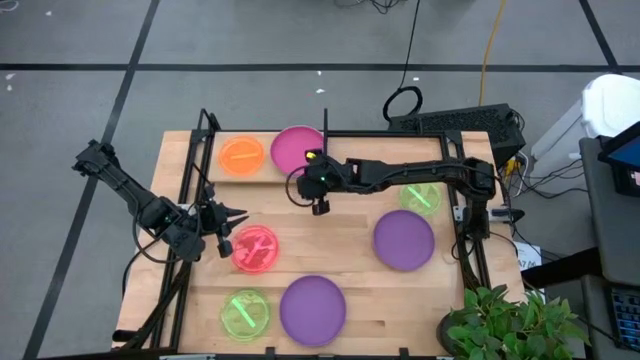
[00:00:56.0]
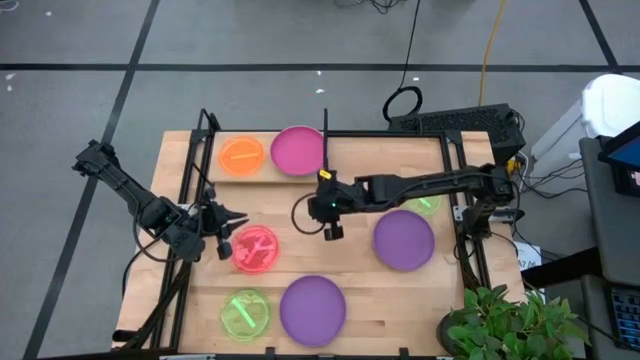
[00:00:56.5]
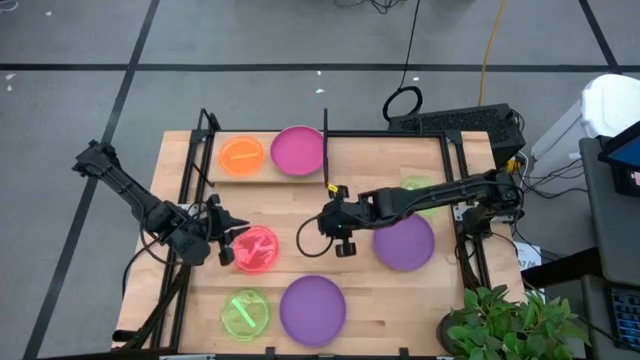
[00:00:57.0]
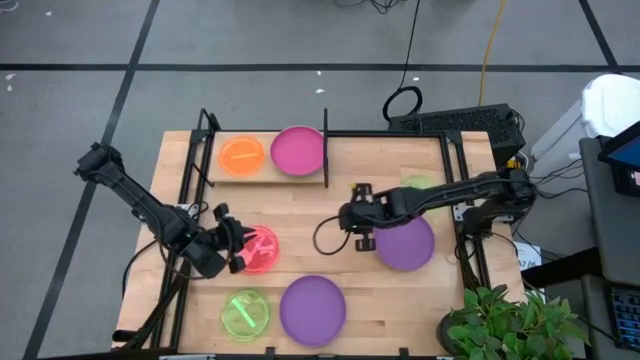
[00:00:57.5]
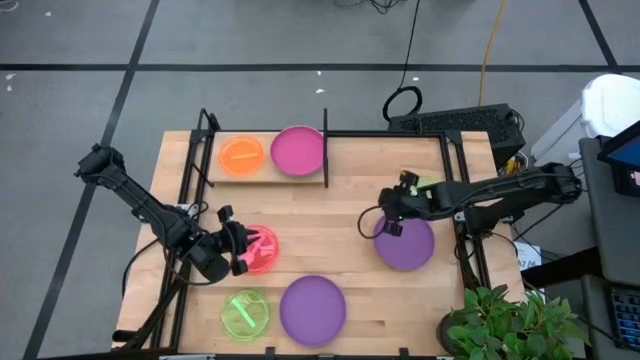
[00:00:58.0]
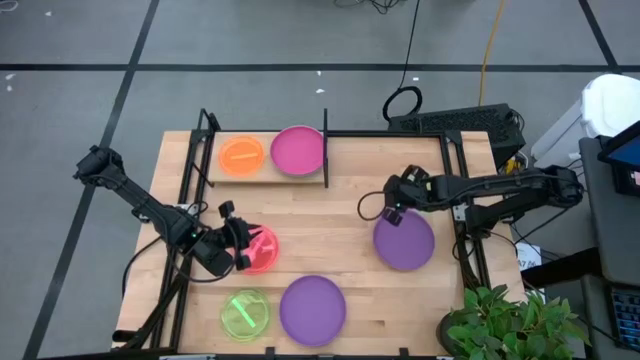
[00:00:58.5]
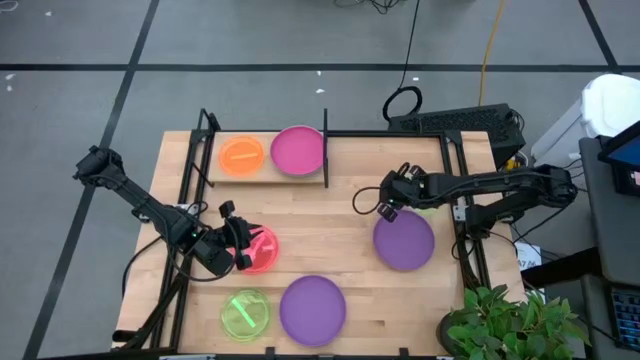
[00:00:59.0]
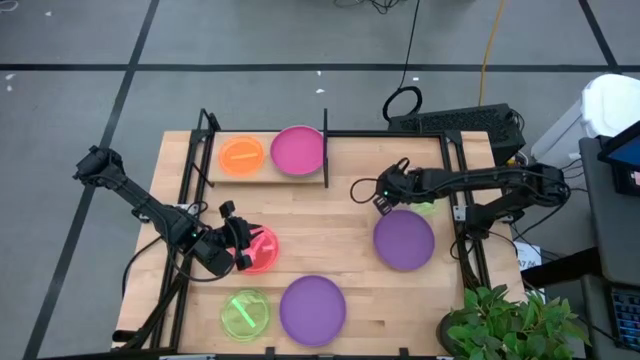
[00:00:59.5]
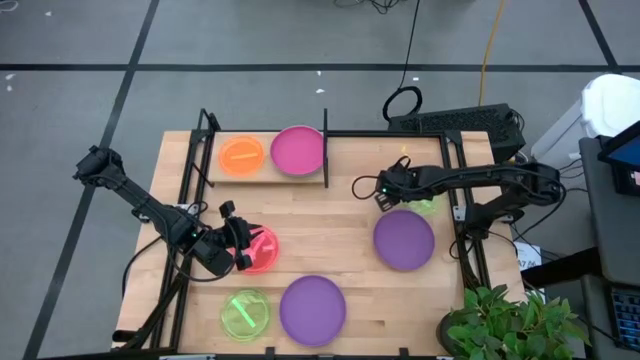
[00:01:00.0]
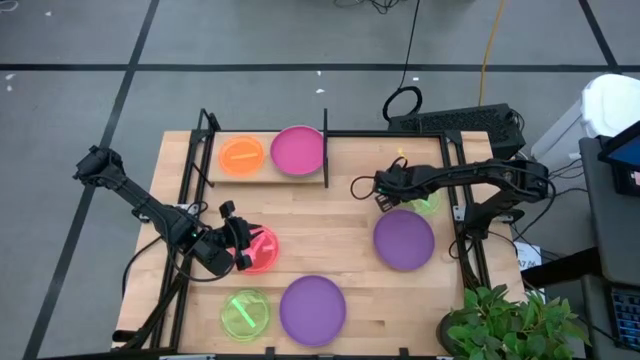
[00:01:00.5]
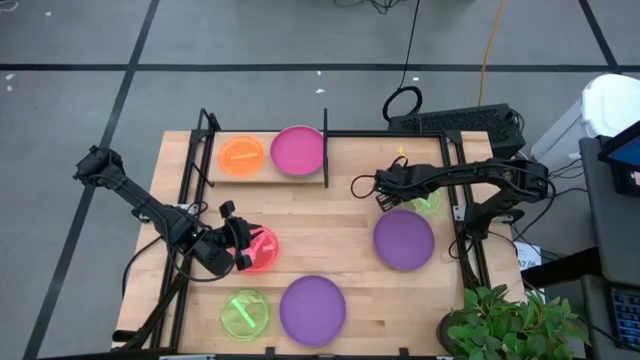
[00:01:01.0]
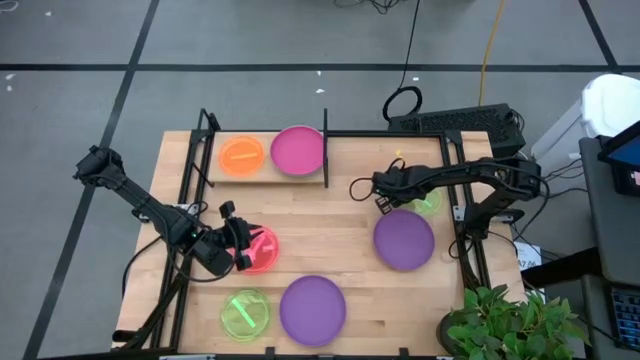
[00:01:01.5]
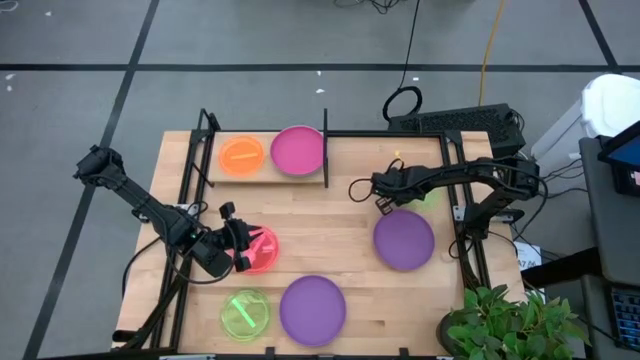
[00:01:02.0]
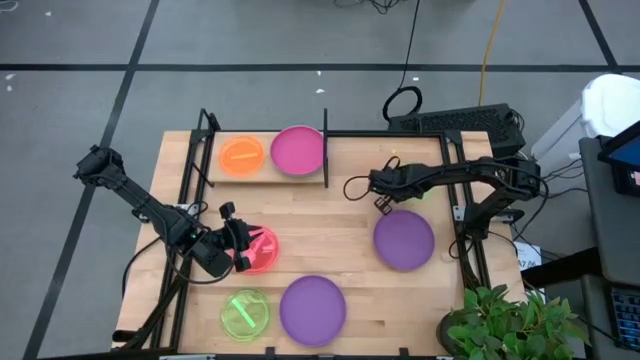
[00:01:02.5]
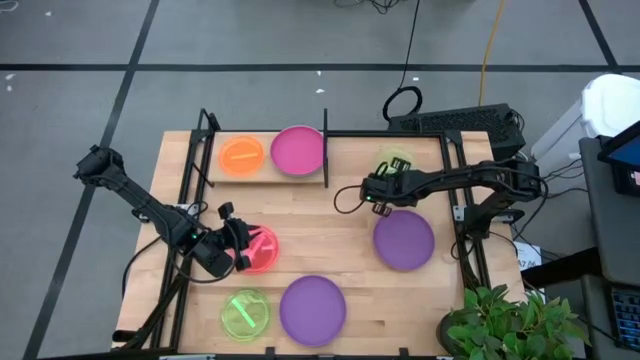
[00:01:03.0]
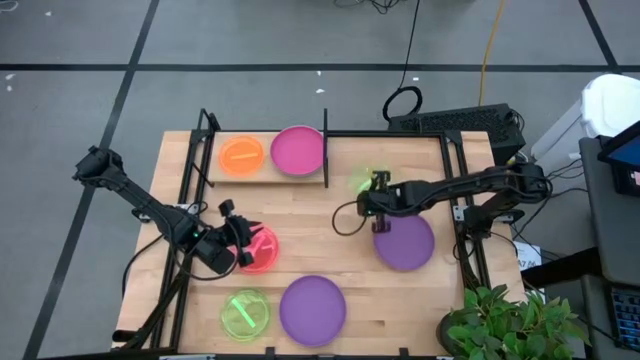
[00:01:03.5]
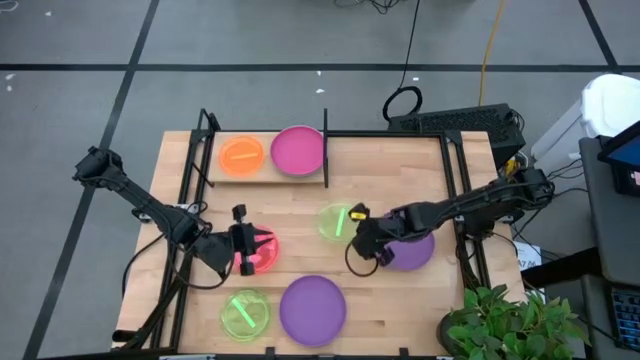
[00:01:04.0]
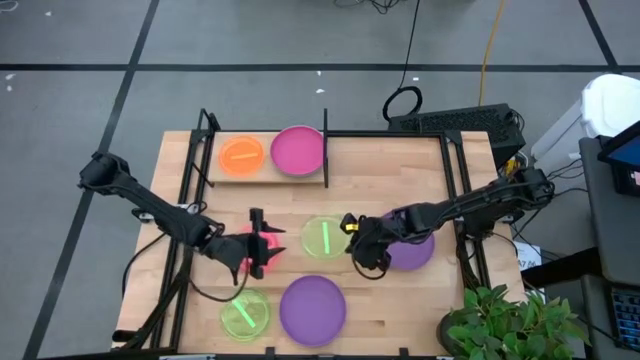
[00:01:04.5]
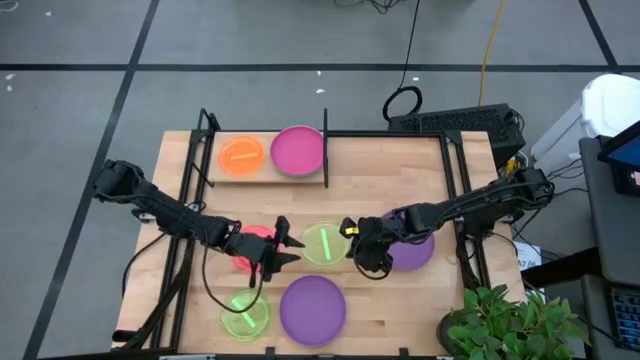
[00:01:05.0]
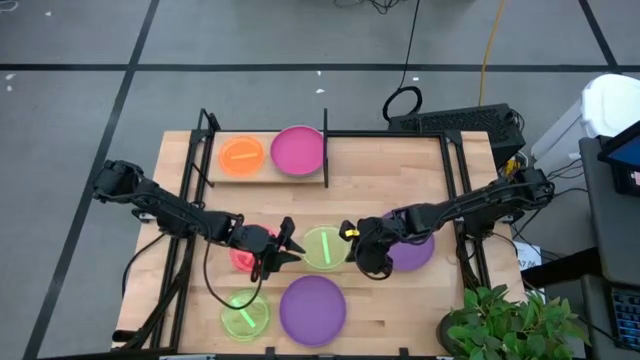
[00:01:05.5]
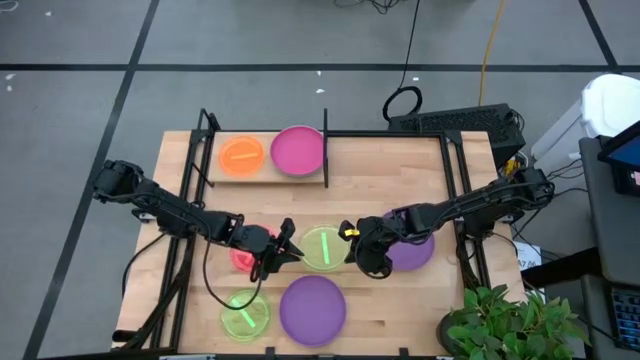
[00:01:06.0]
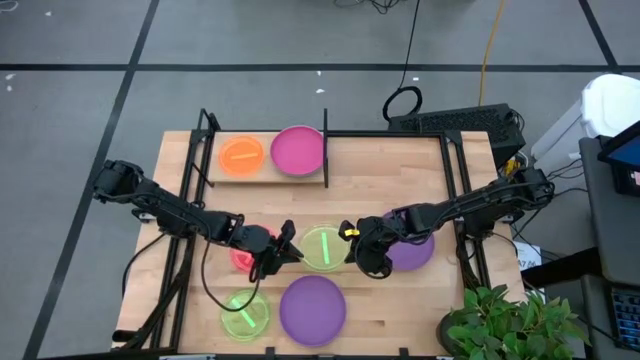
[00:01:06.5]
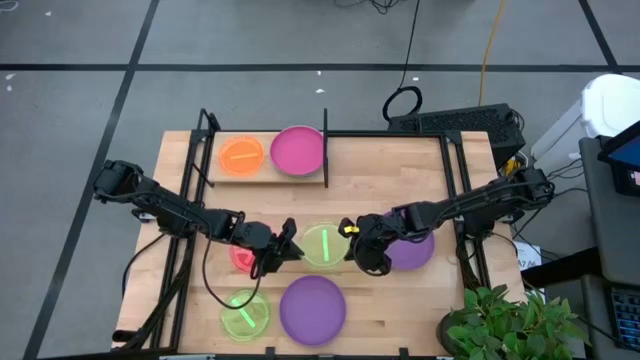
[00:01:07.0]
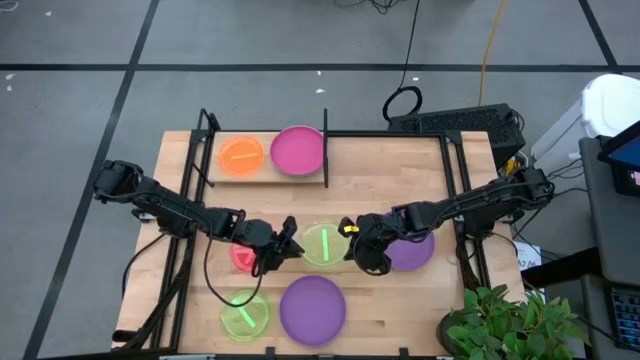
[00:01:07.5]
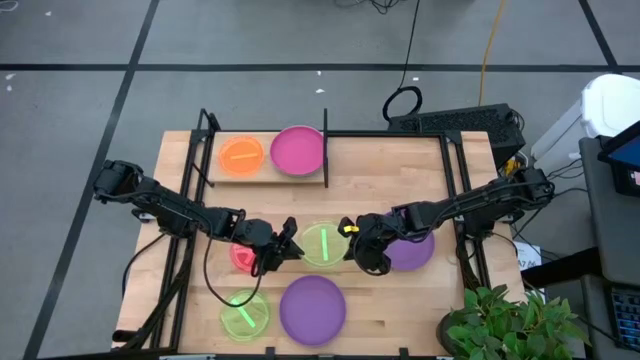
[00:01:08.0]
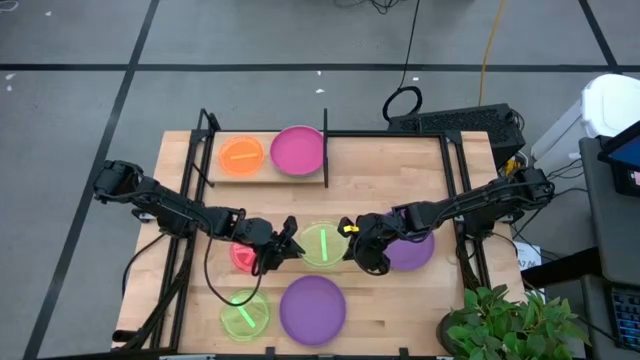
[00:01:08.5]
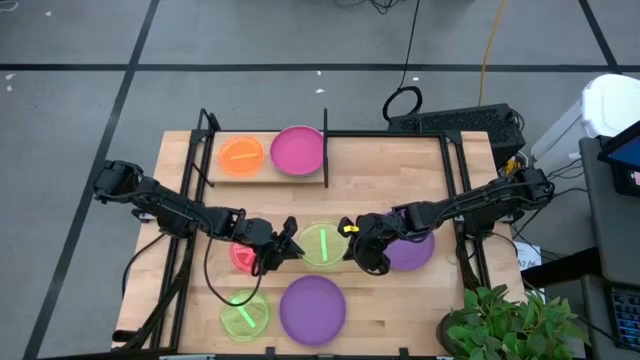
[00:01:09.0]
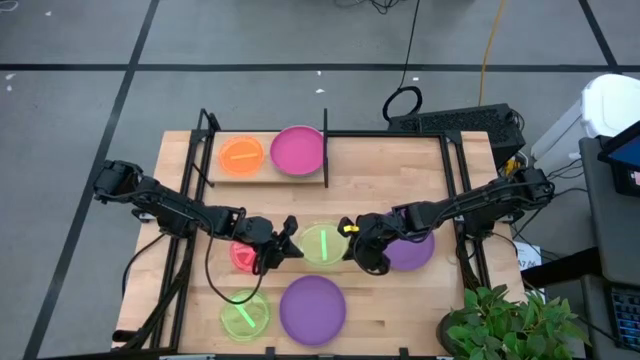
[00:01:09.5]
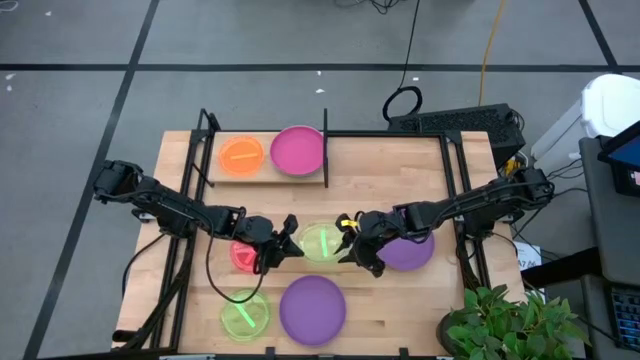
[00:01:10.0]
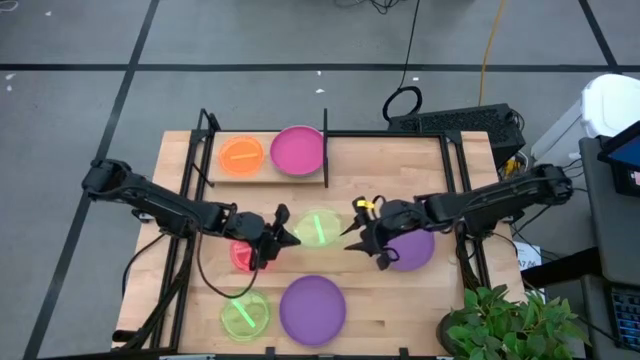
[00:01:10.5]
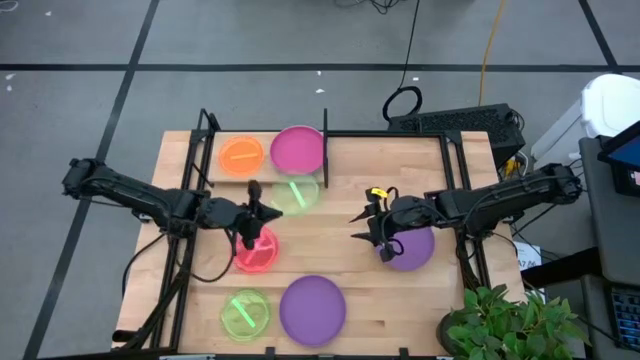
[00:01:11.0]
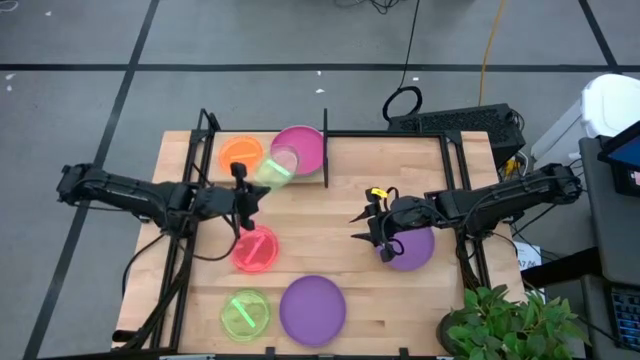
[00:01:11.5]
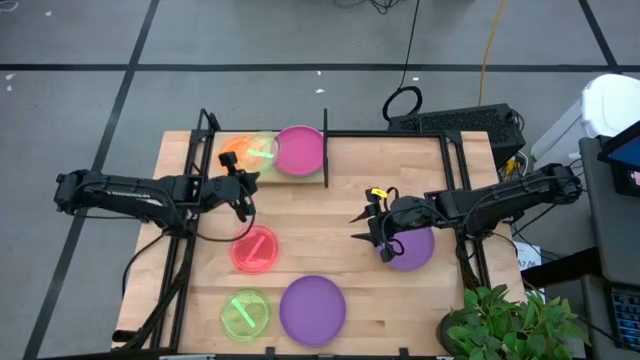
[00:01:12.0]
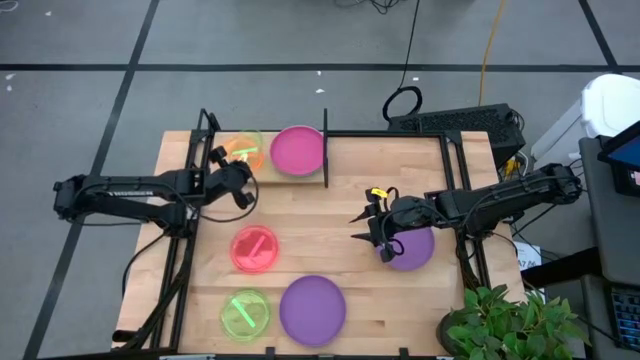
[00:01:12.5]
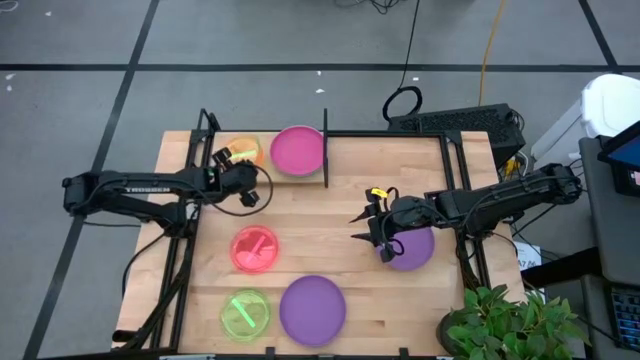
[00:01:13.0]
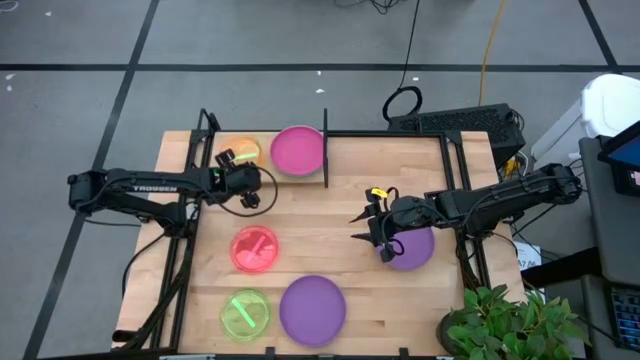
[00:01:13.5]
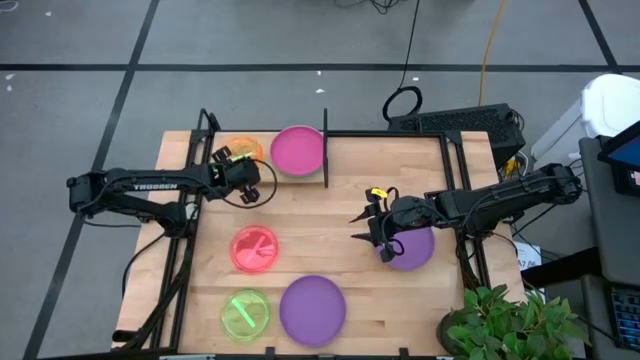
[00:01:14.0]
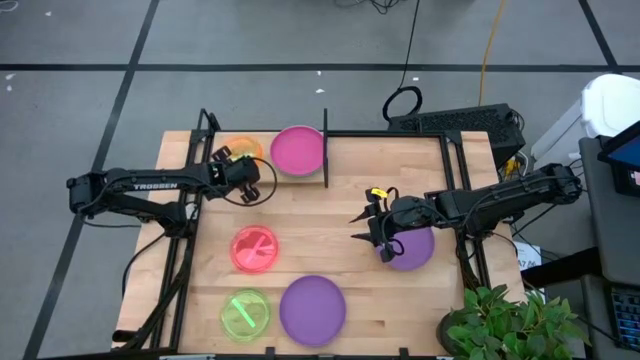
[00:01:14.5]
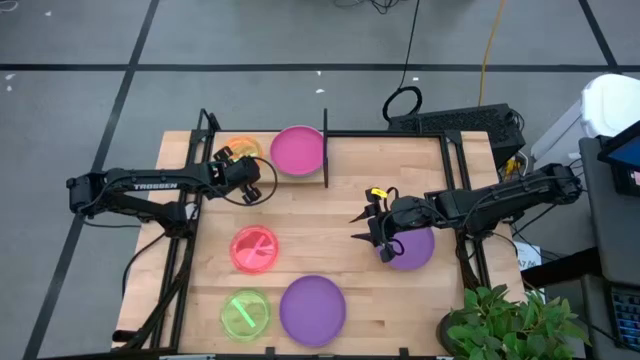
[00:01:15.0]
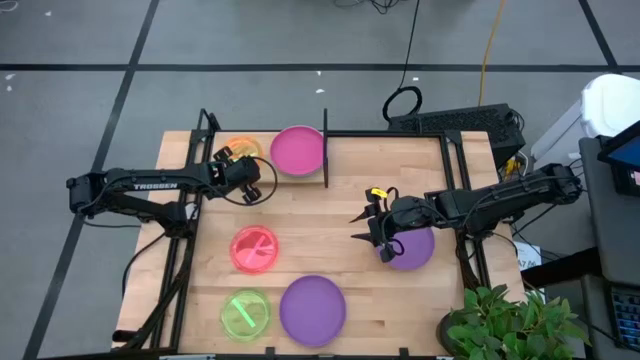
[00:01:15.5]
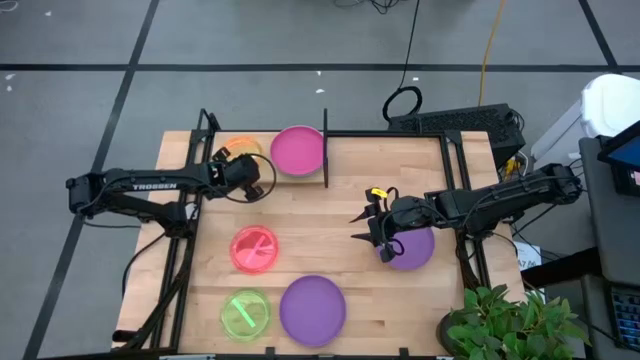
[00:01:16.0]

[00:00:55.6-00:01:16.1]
Task: Place and stack plates onto a shelf
Stack the top transparent green plate on the transparent orange plate on the shelf

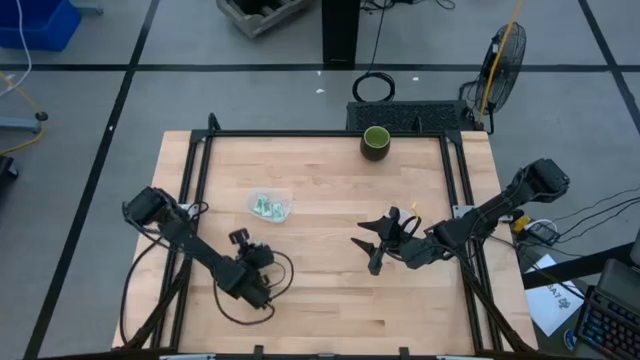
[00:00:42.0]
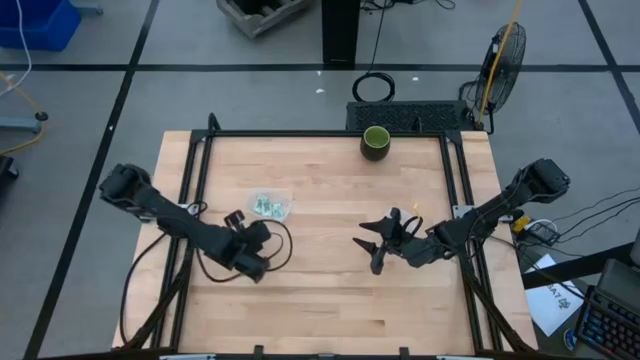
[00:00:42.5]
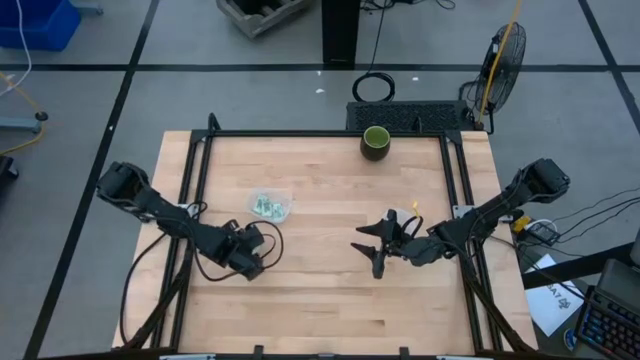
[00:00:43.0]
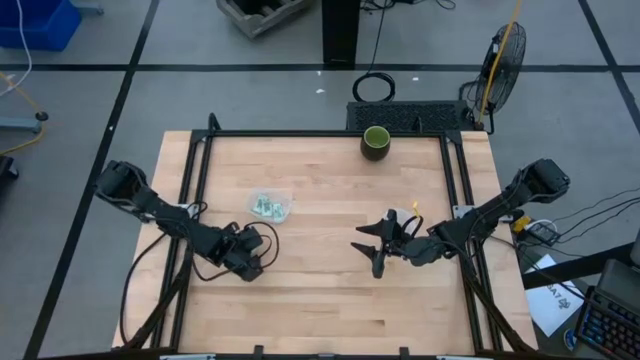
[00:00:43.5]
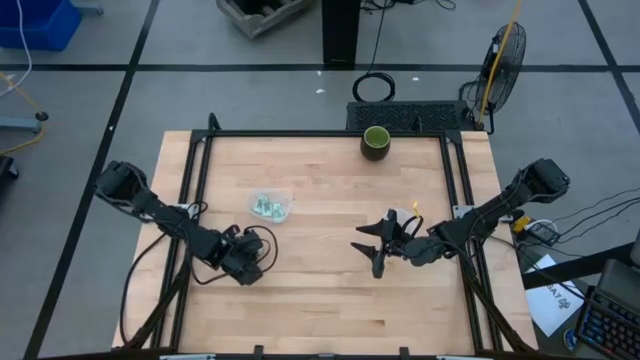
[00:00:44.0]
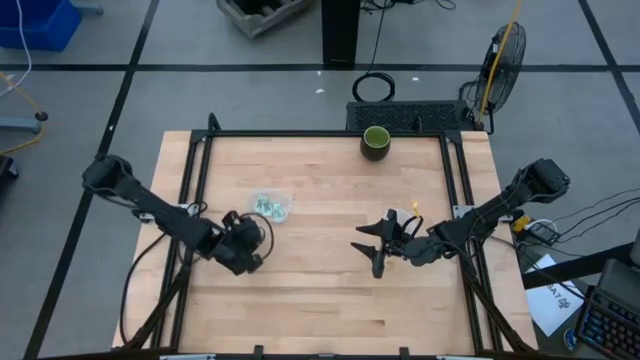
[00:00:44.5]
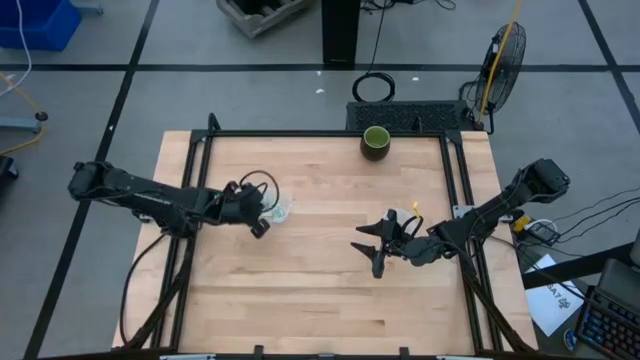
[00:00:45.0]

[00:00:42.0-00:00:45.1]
Task: Pick and place Stevia / Truvia into bins
Put the white stevia packet into the transparent rectangular container
